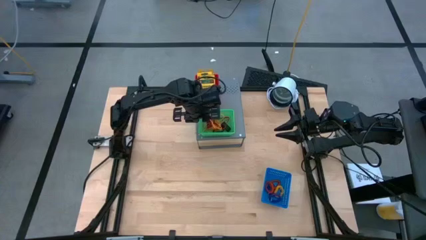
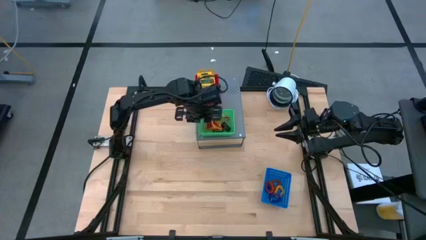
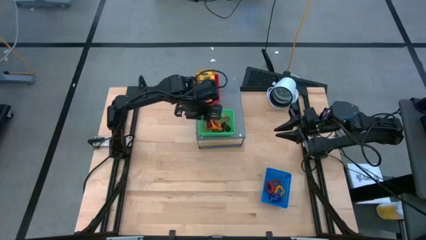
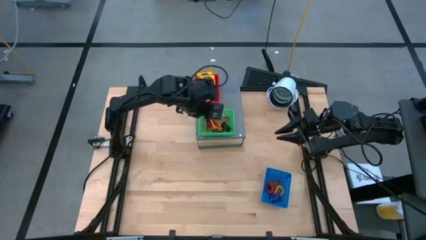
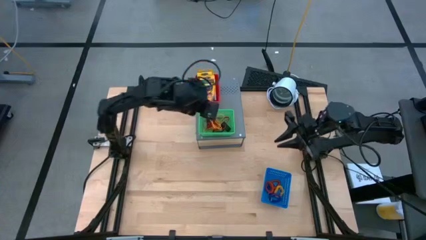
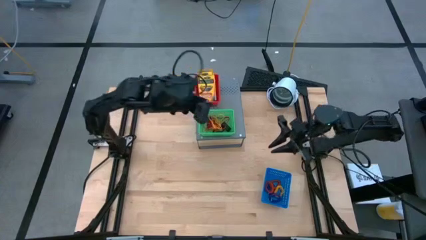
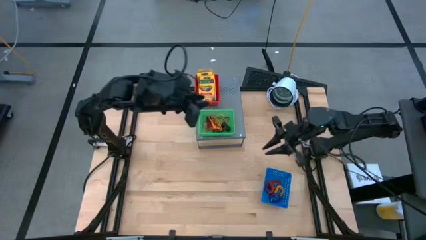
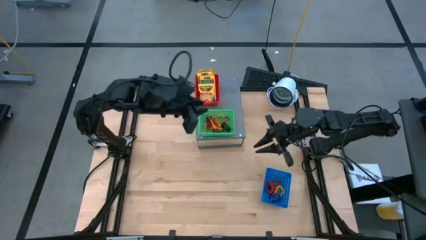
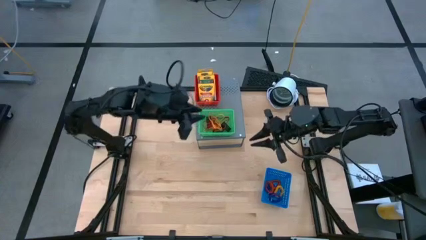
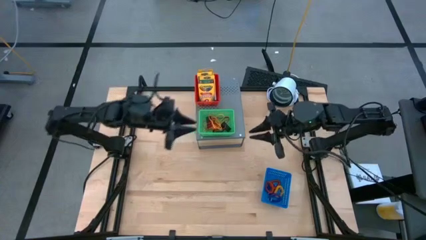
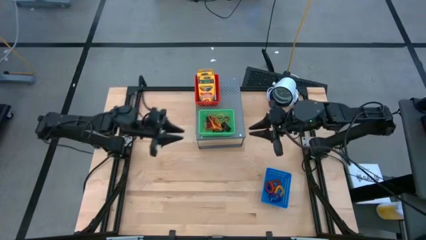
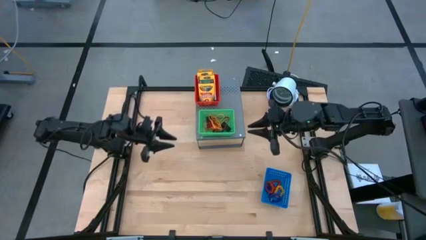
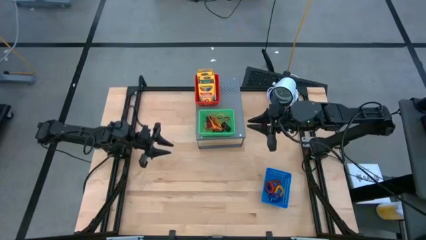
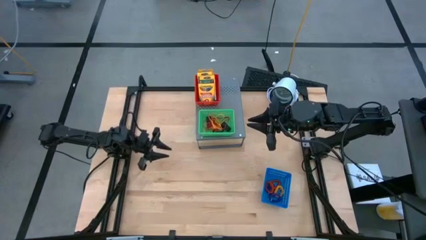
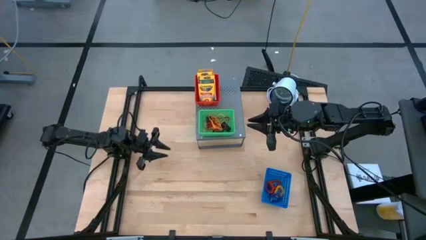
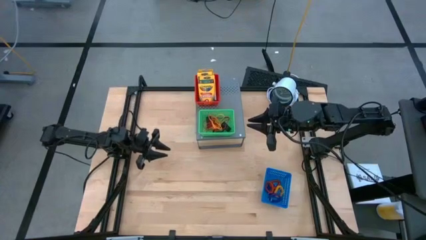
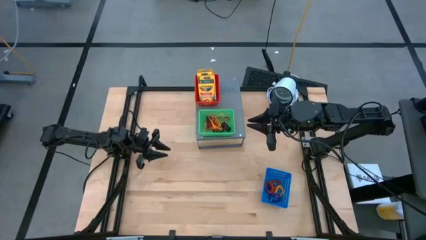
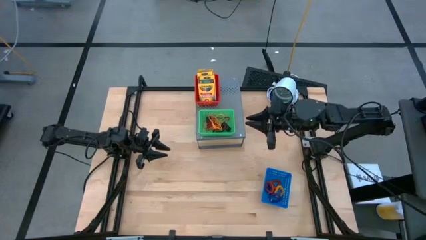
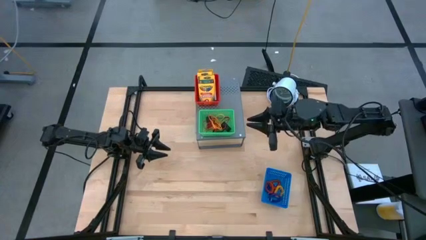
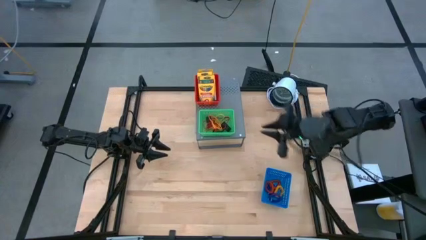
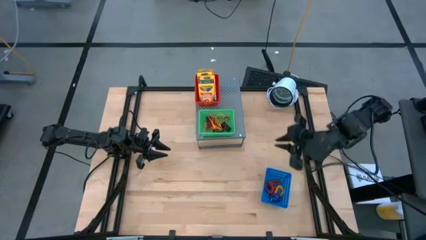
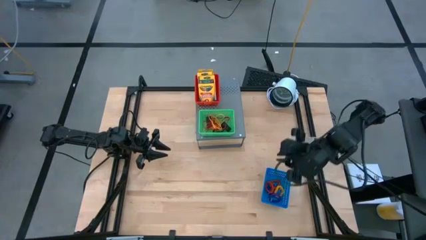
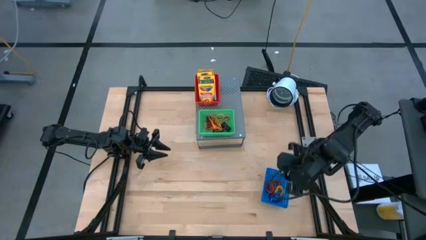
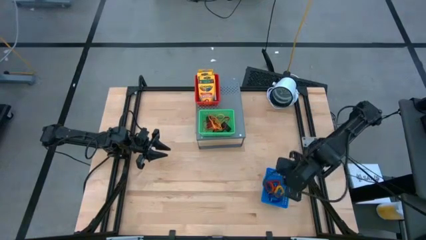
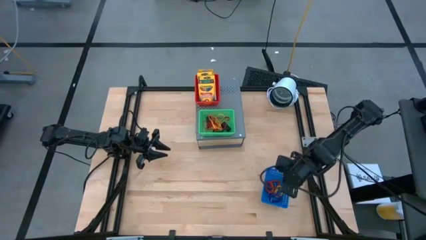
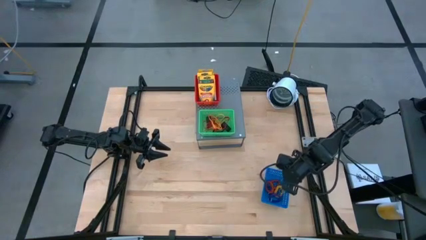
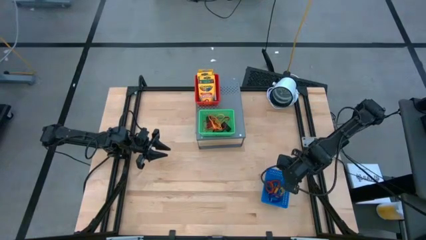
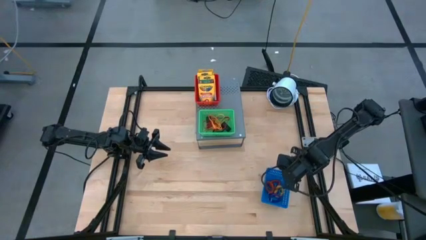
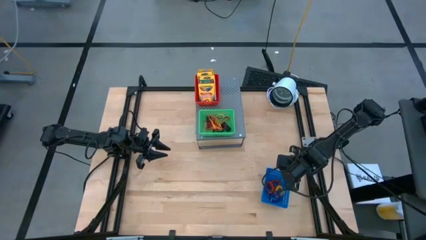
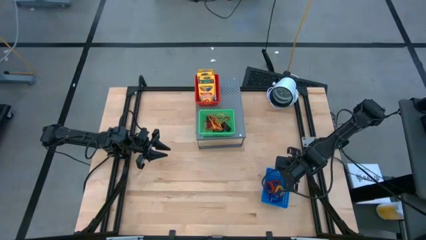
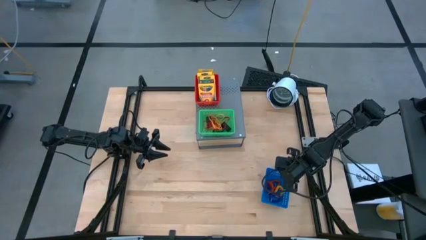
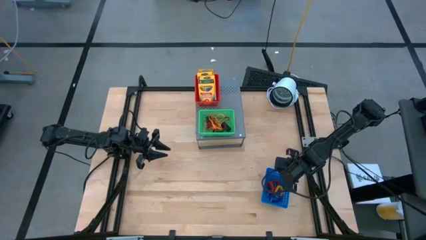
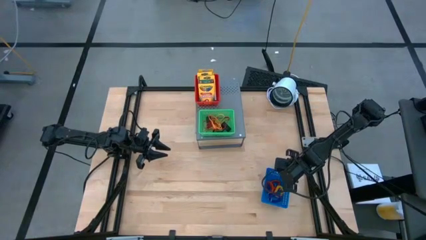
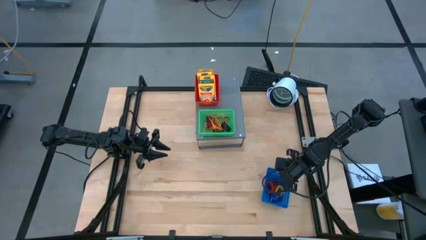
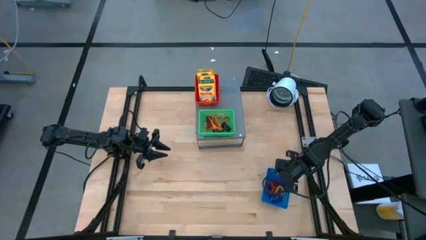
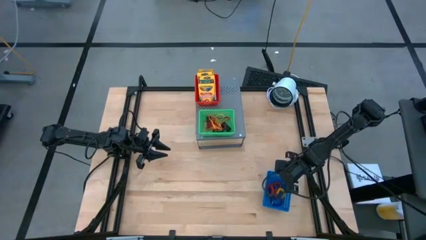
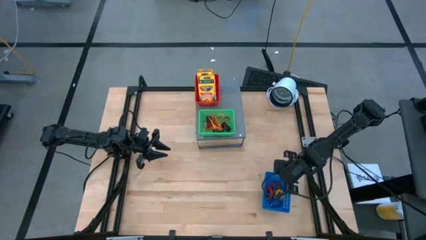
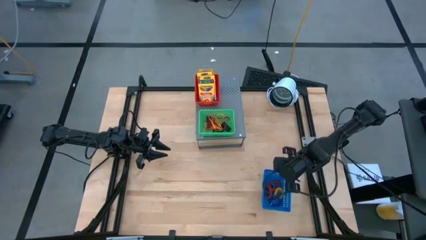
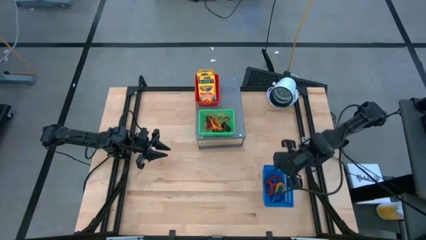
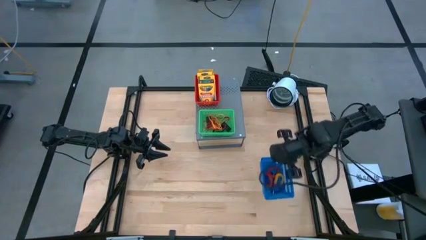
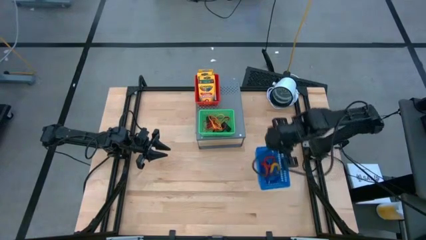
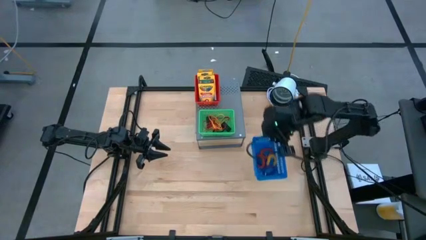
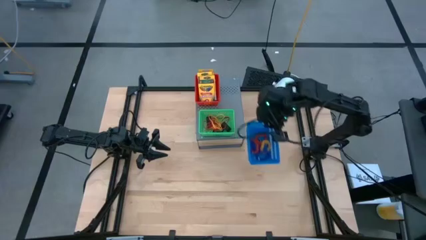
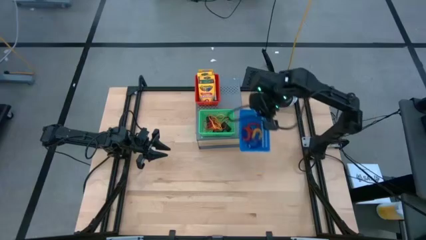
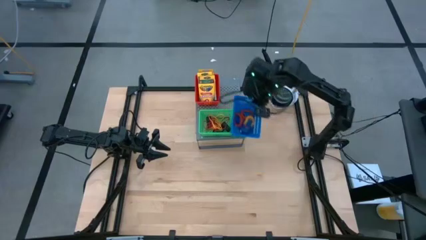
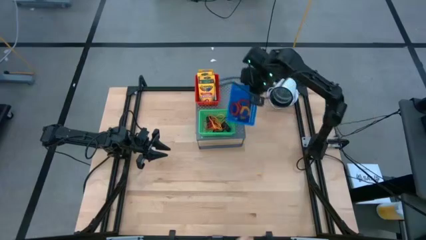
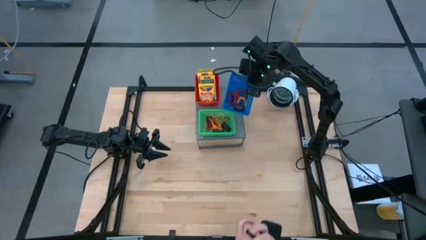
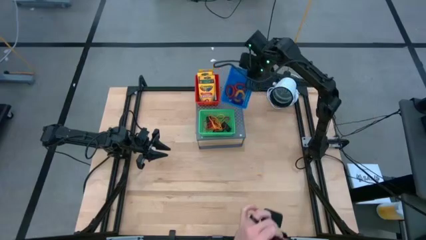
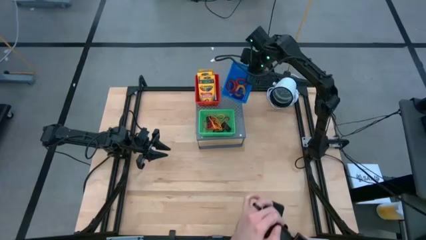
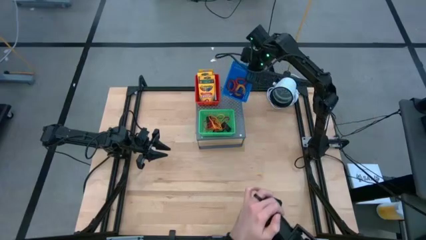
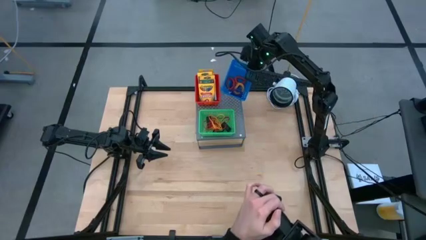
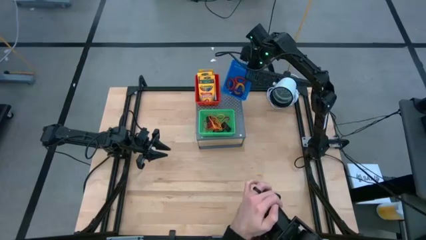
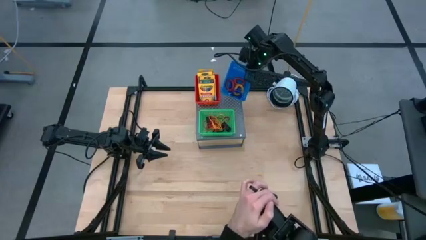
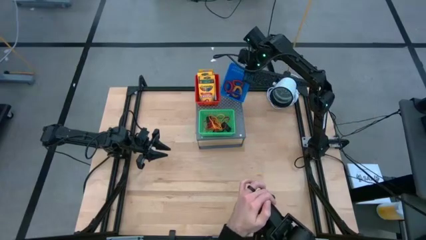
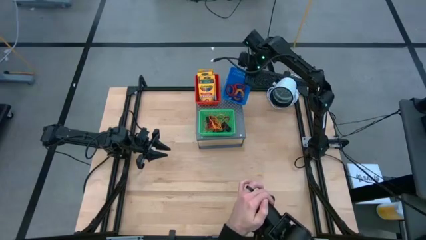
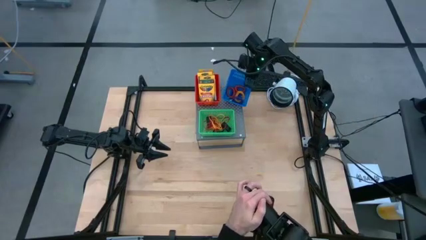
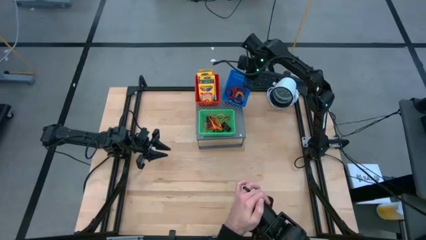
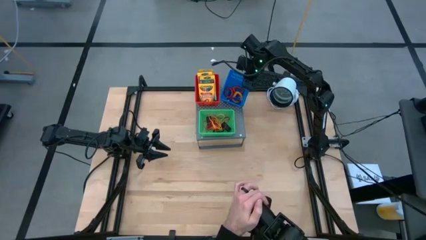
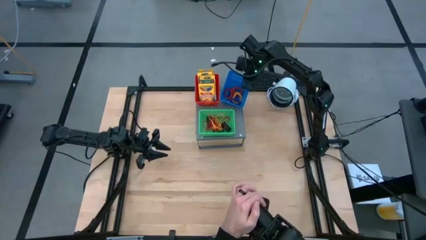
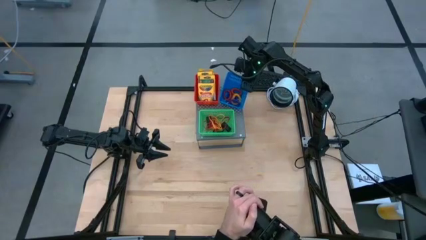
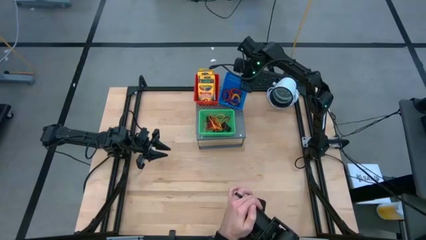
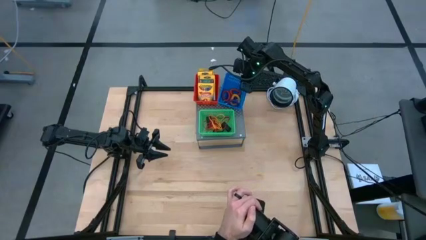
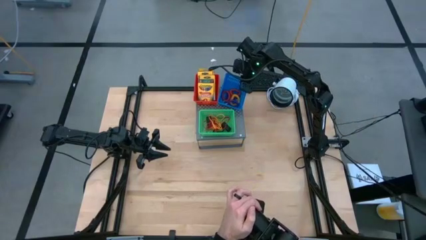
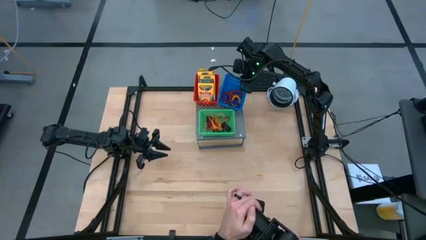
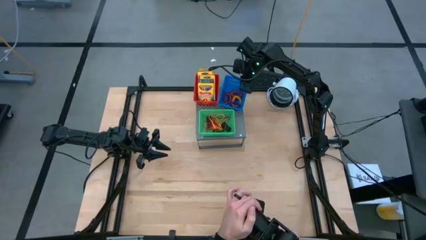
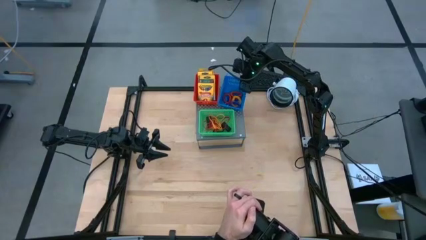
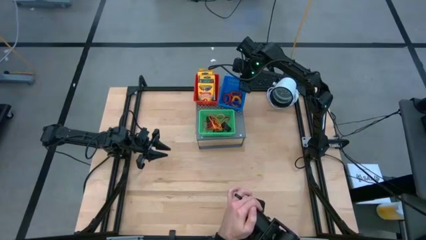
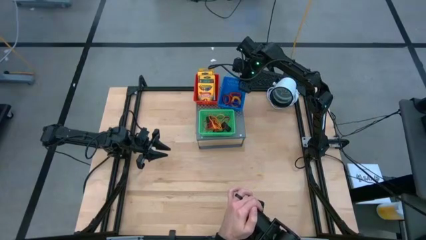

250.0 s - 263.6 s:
Task: Pick & Place Office Desk Supplies
Put the blue bin on the shelf

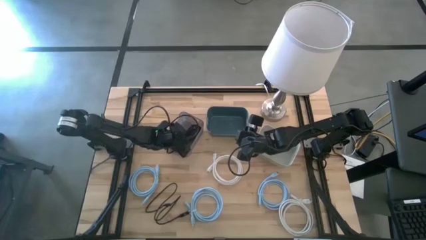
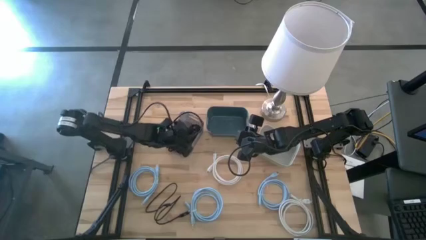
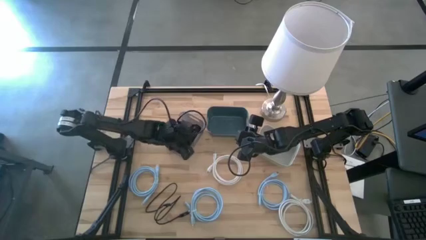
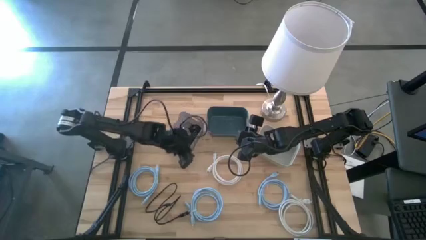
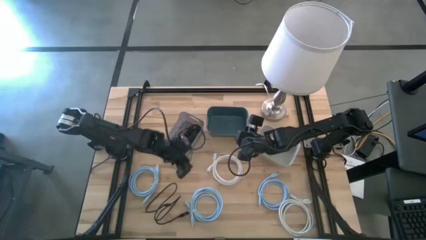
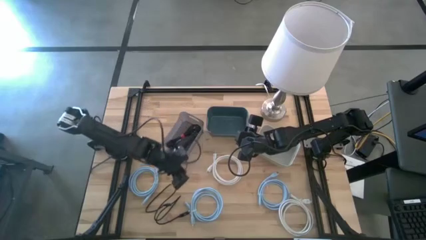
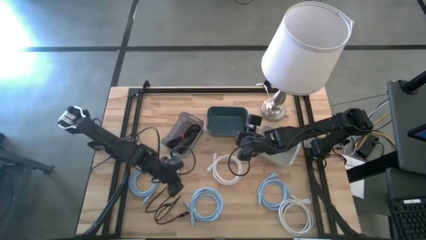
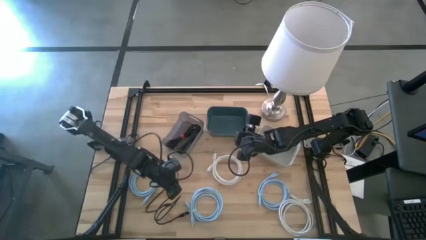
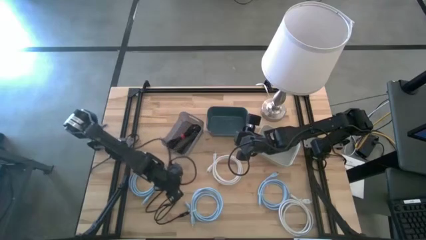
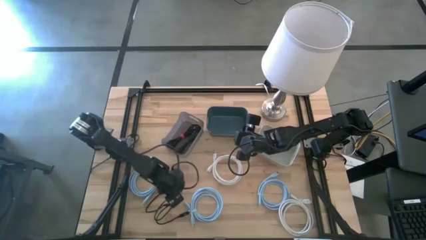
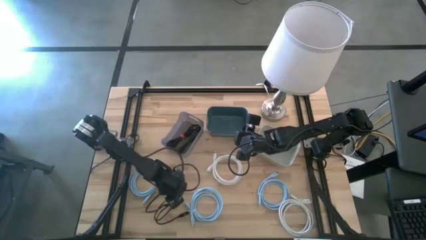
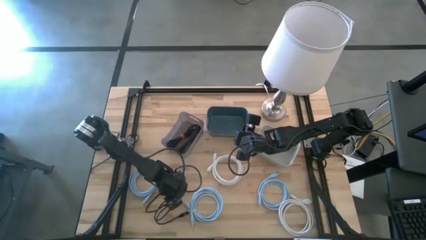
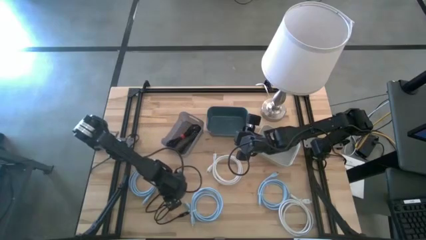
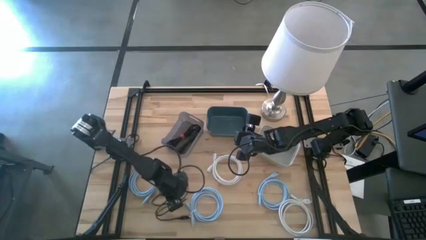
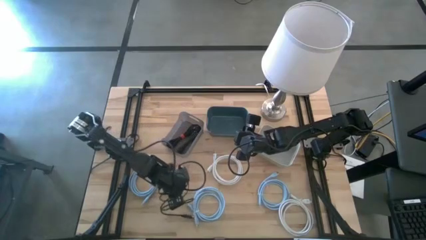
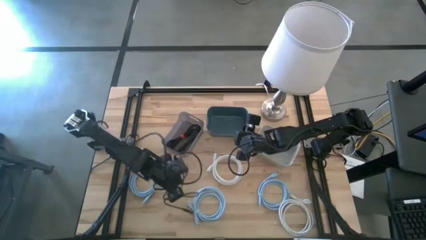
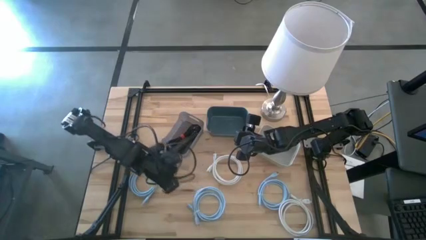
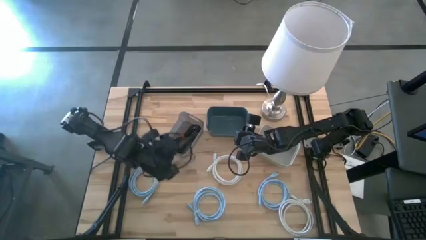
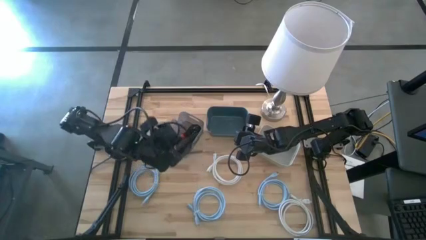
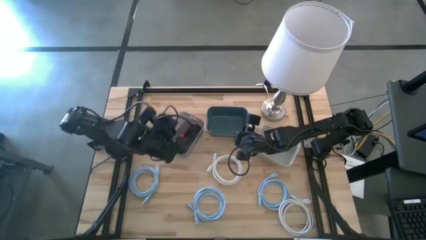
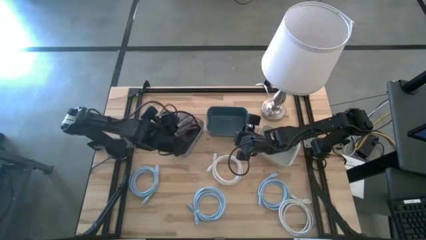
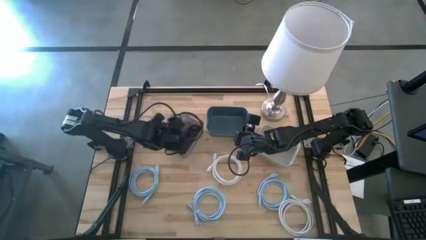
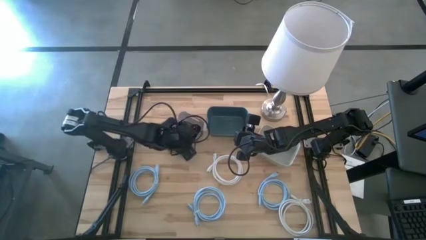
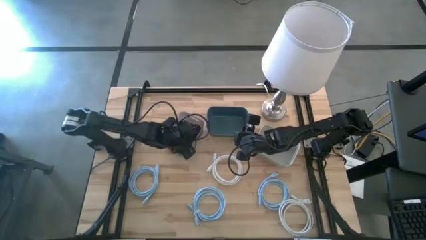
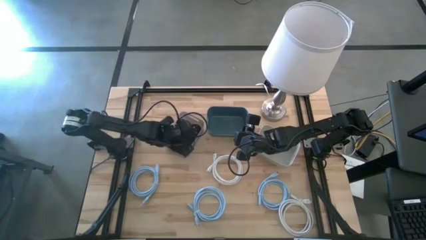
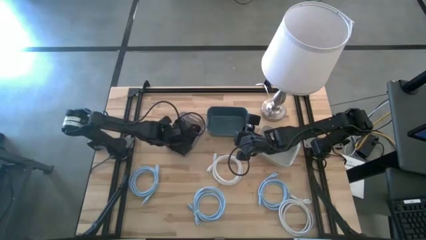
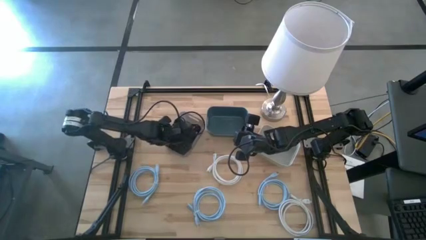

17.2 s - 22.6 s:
Task: Sort HDMI cables
Put the black HDMI cable into the black bin
